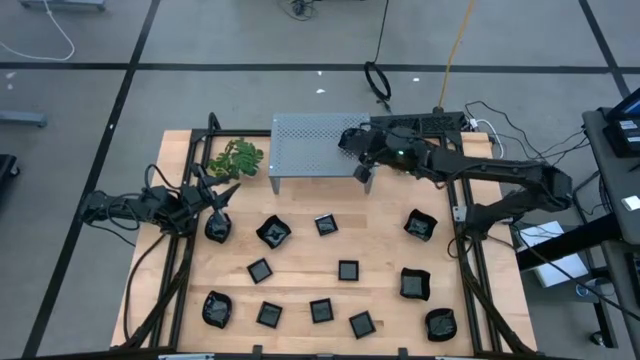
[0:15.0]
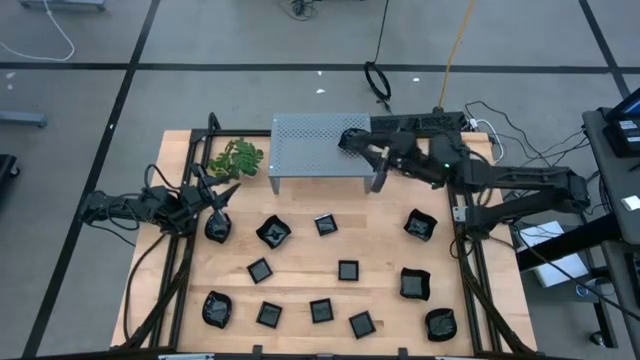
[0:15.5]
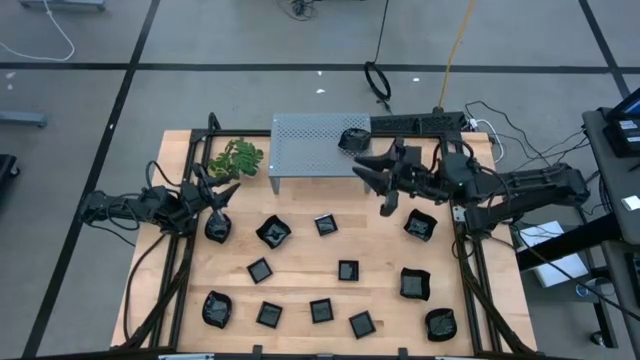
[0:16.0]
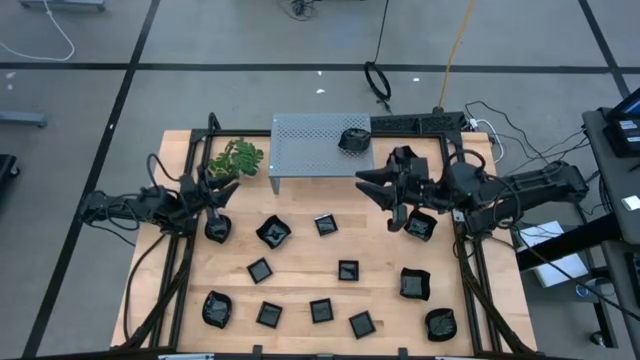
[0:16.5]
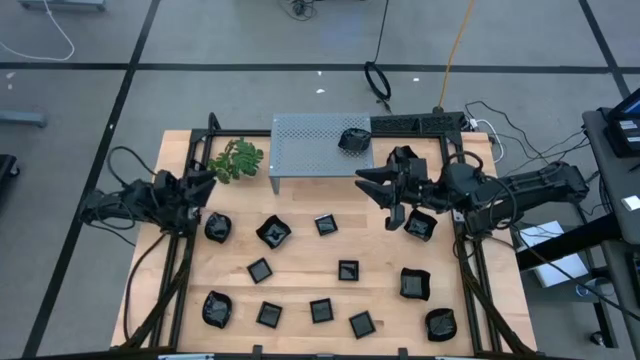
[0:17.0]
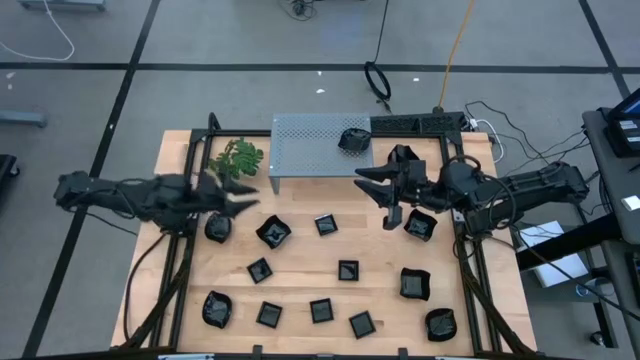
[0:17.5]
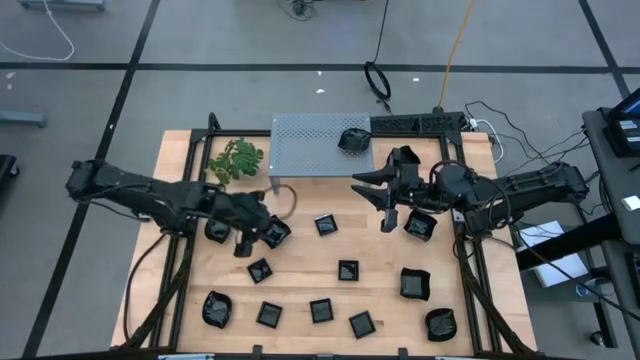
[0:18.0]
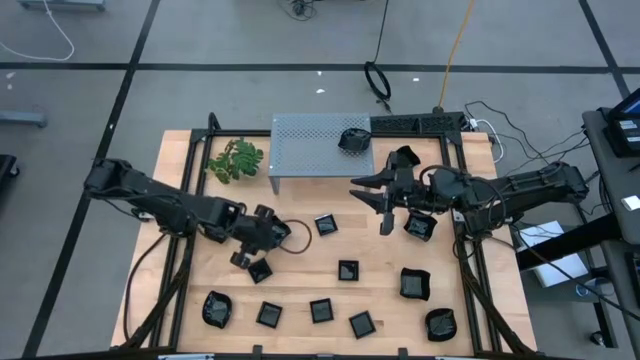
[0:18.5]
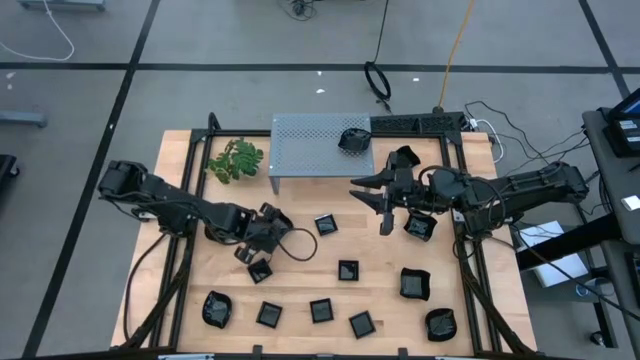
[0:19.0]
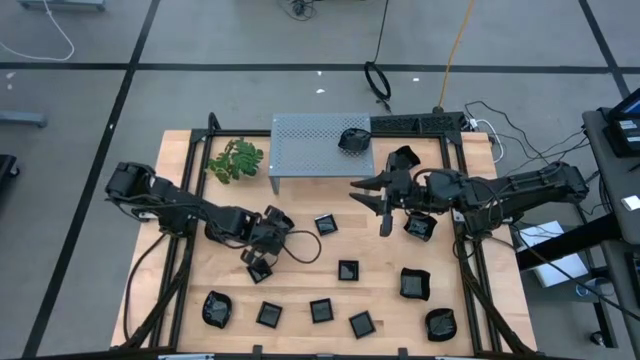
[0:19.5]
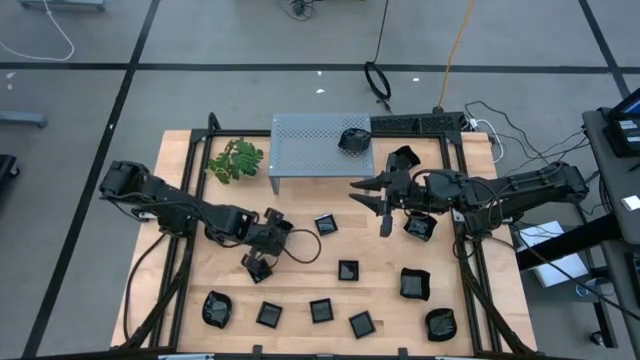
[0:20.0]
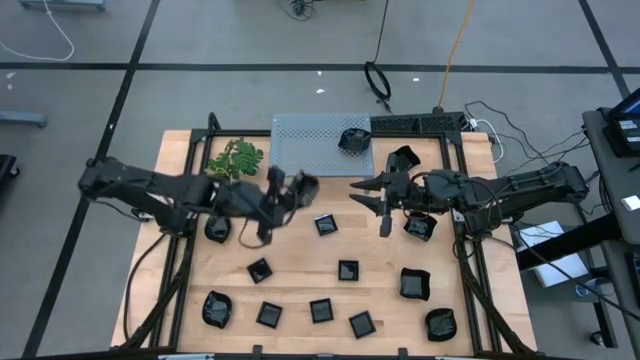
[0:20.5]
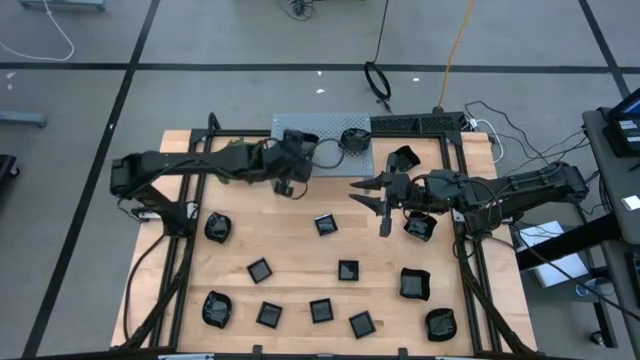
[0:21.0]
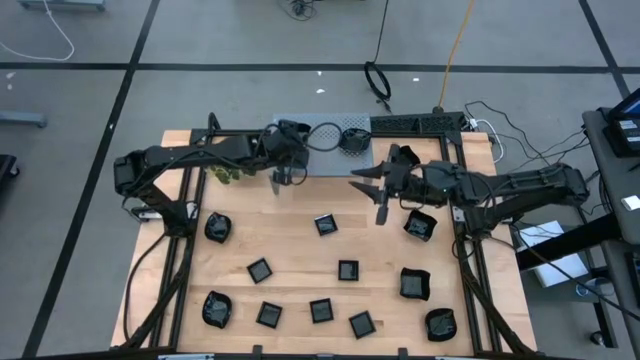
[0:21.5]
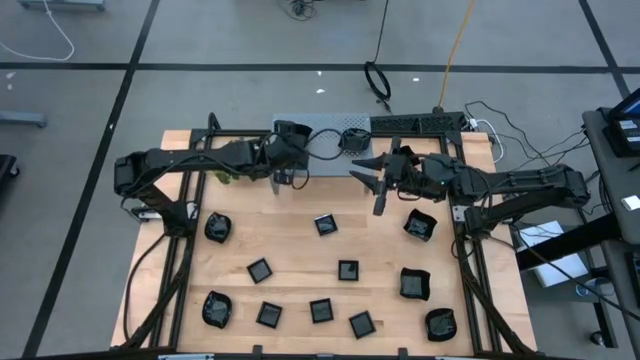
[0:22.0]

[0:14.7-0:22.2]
Task: Pick & Place Mini shaped plates
Put the black distorted square plate on the shelf

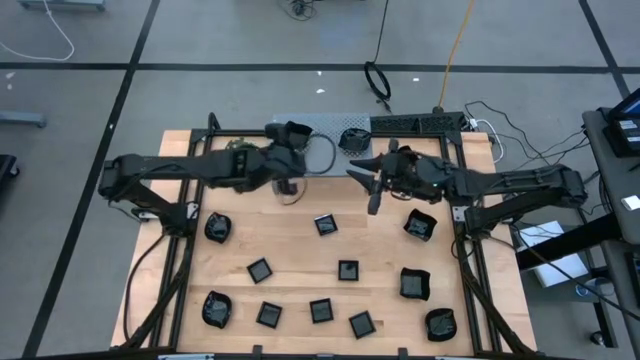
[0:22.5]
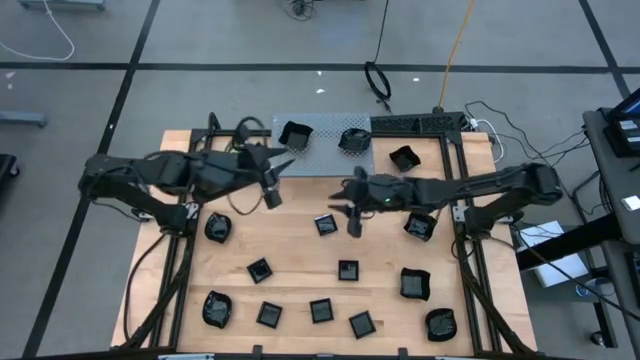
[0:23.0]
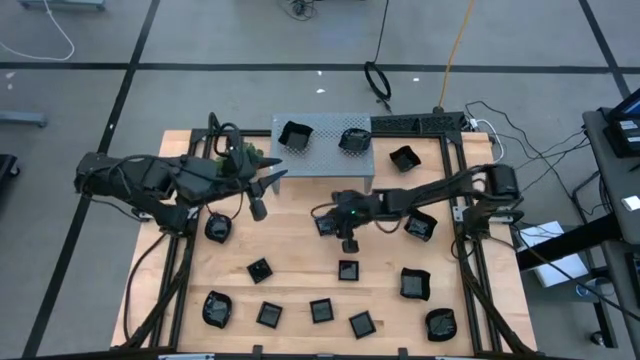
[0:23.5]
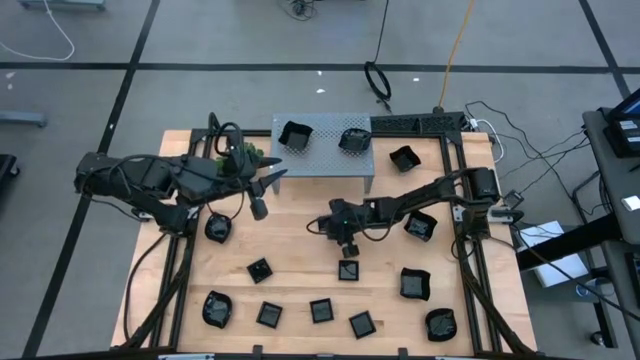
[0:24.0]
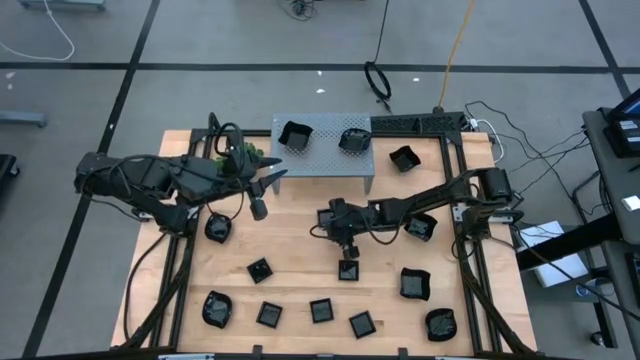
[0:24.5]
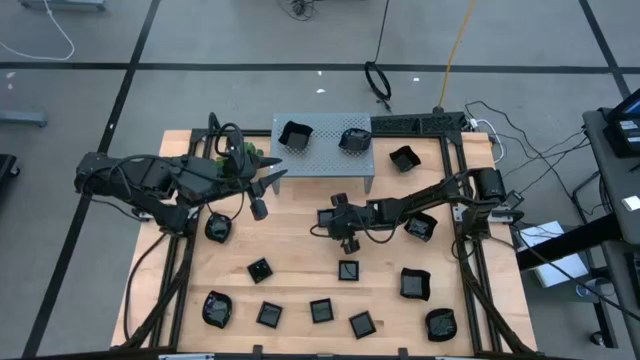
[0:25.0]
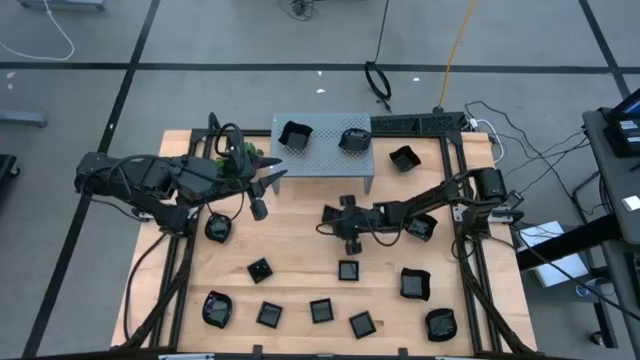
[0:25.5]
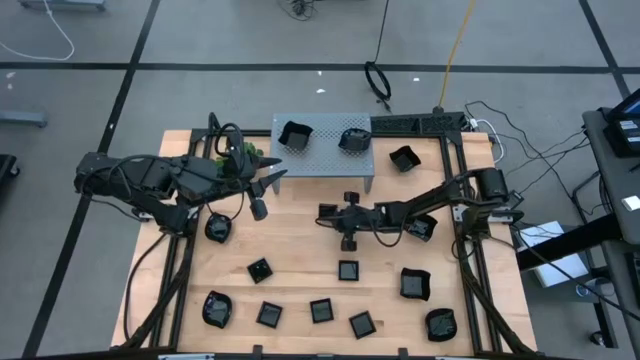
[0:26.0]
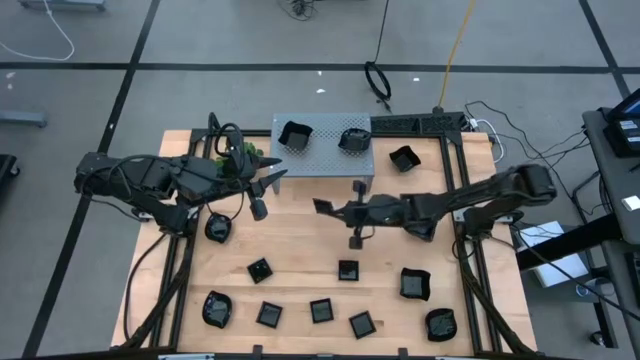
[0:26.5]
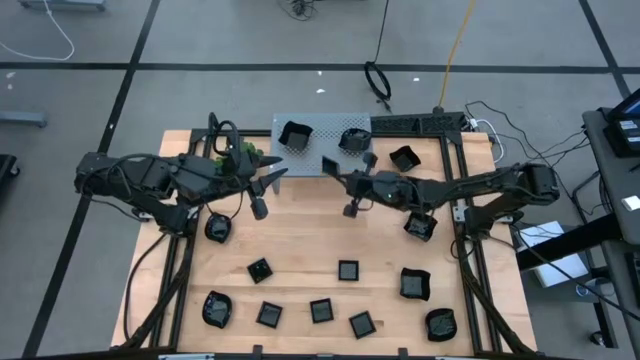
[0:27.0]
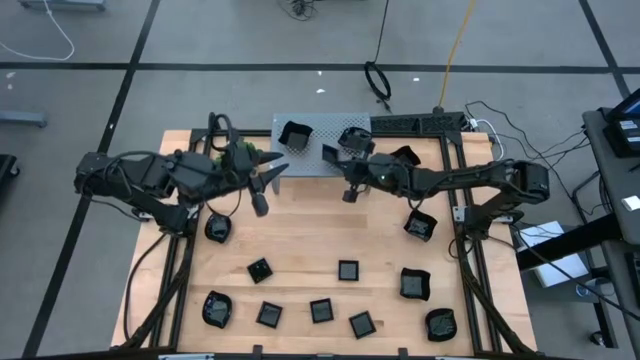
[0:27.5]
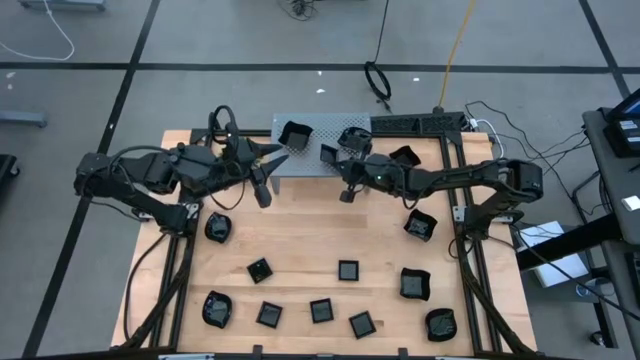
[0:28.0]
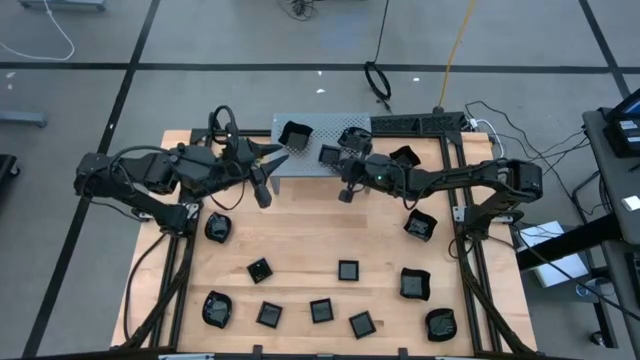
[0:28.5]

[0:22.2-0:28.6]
Put the black square plate on the shelf

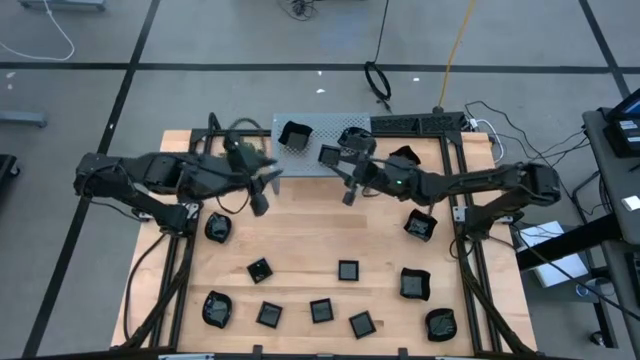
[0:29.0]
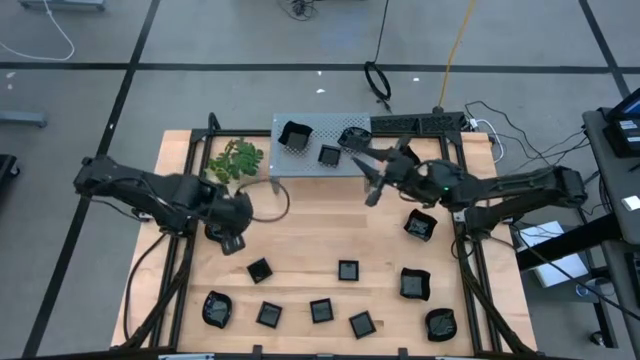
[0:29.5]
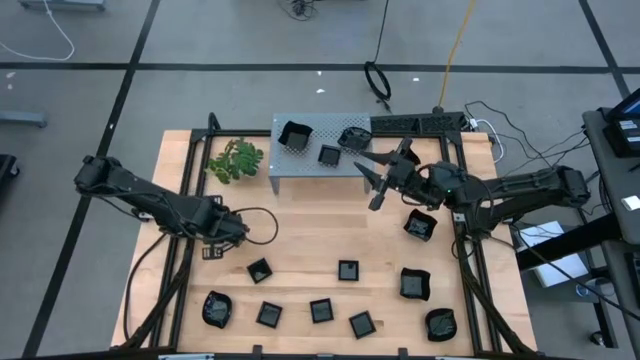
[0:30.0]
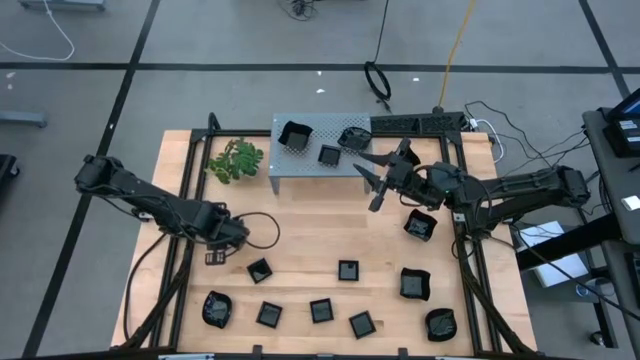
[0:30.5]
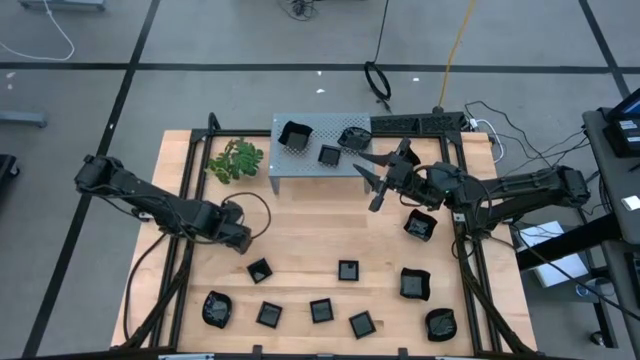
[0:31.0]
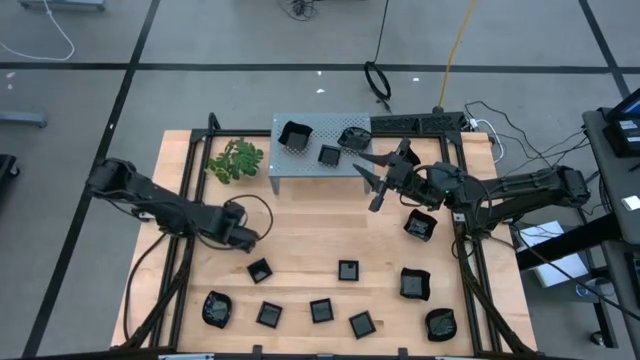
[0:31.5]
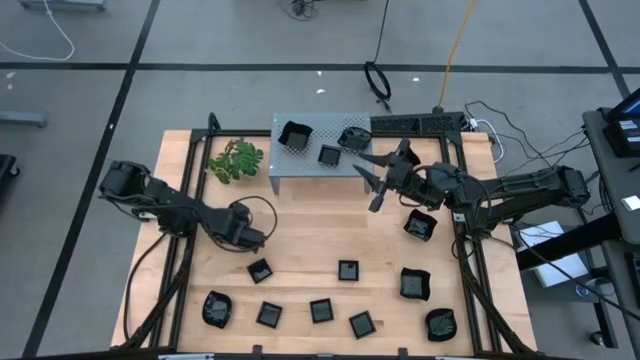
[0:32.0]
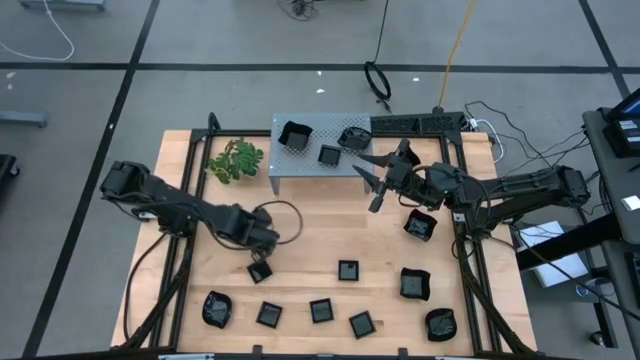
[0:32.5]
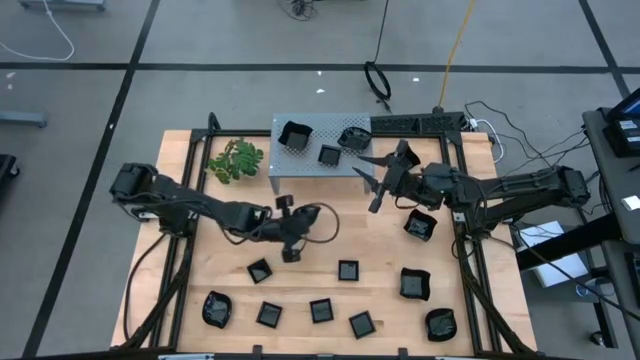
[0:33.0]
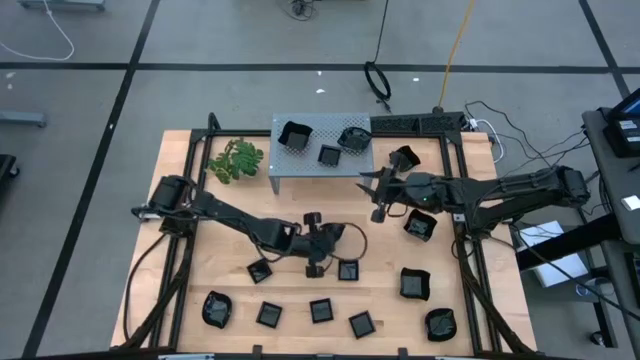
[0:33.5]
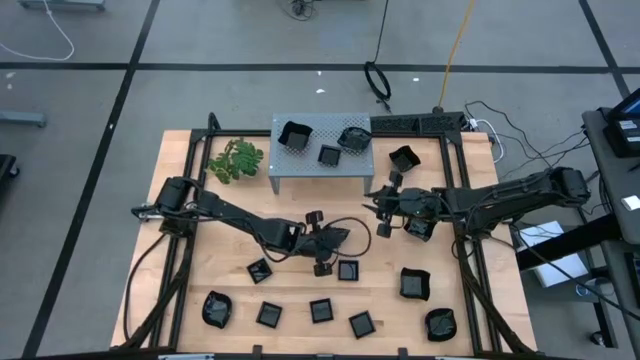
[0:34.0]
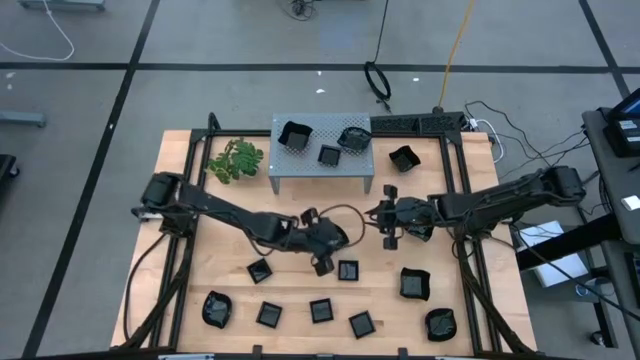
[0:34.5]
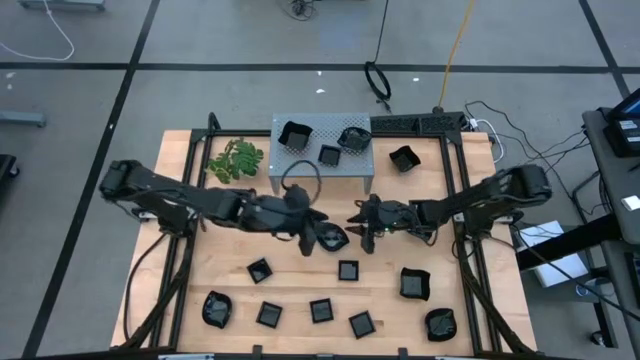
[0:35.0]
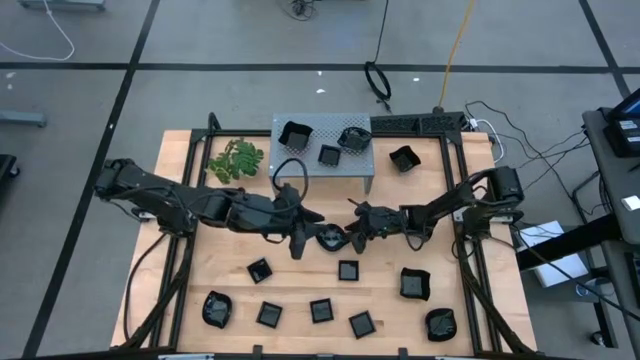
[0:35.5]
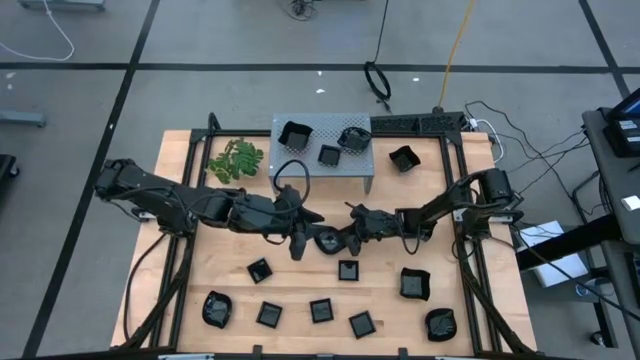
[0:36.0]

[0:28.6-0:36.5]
Stack the black leaf-shaped plate on top of the black leaf-shaped plate on the shelf
